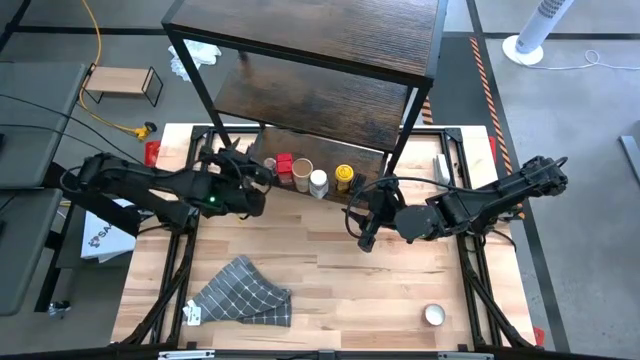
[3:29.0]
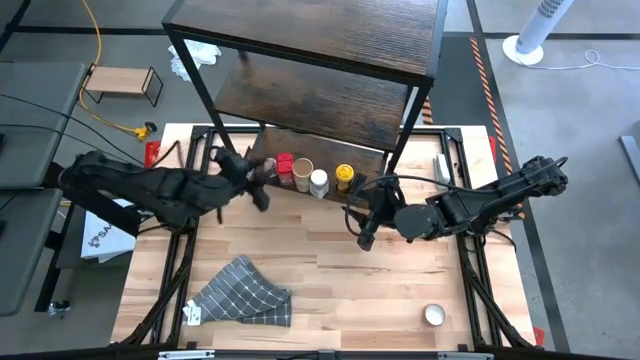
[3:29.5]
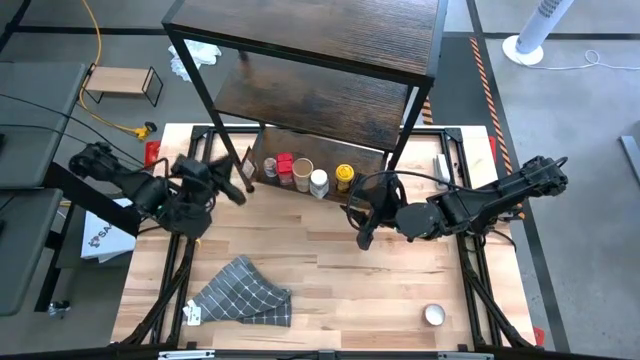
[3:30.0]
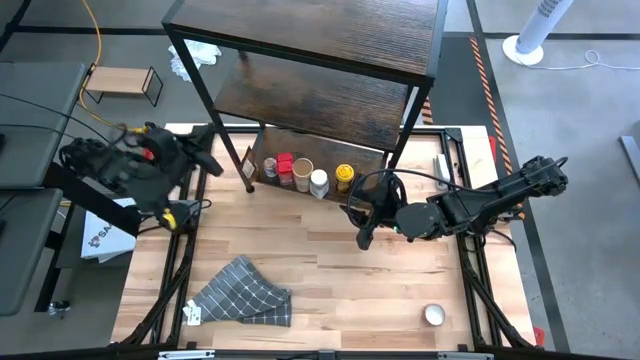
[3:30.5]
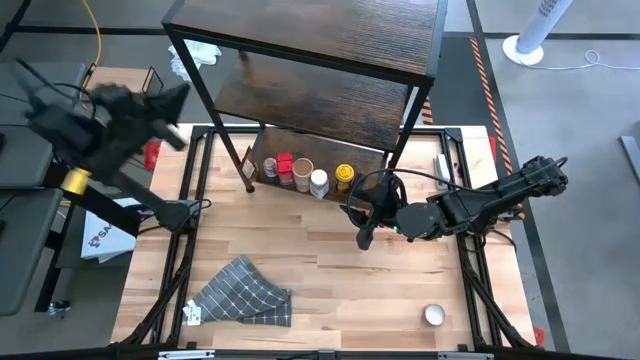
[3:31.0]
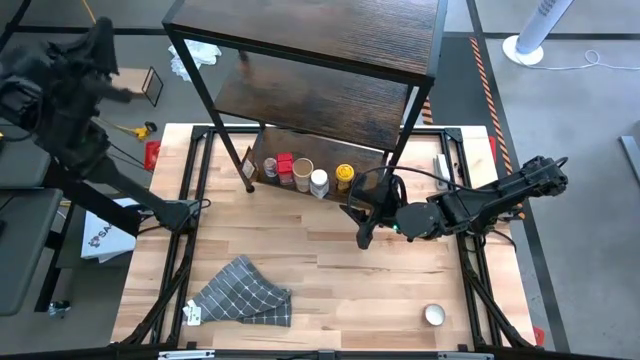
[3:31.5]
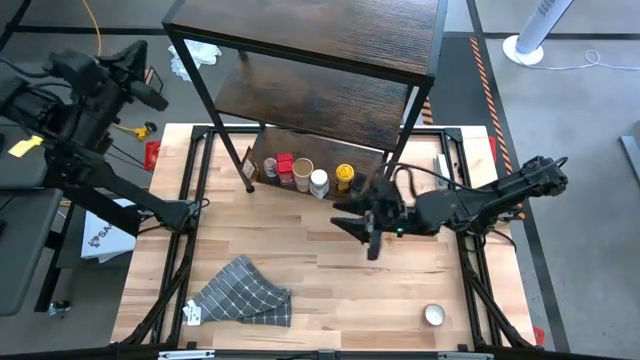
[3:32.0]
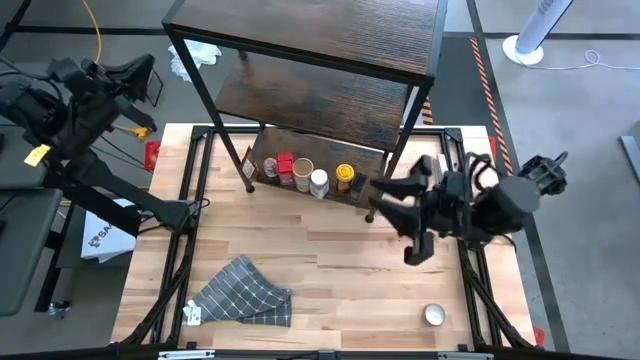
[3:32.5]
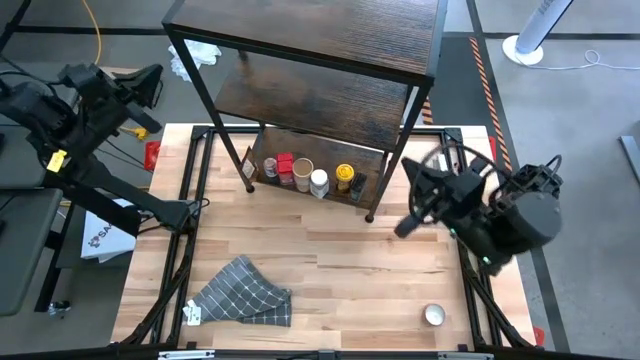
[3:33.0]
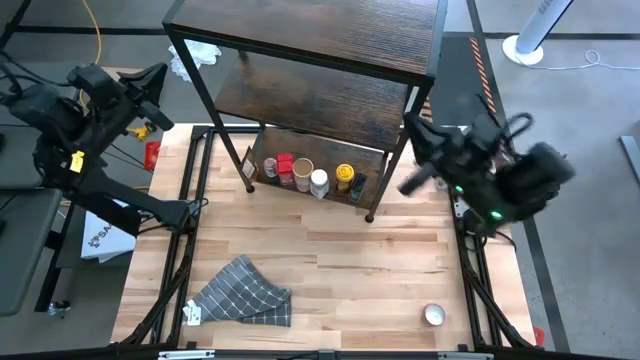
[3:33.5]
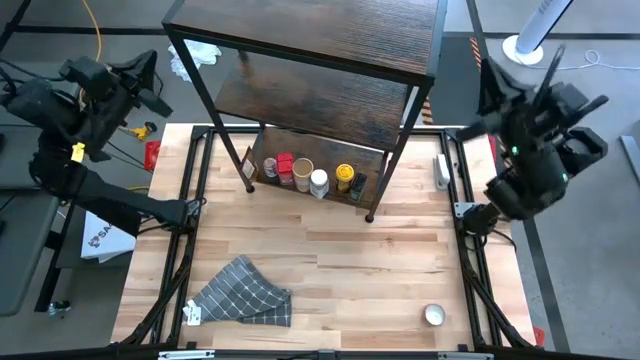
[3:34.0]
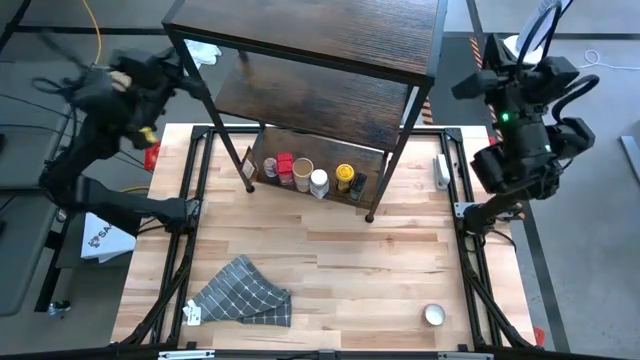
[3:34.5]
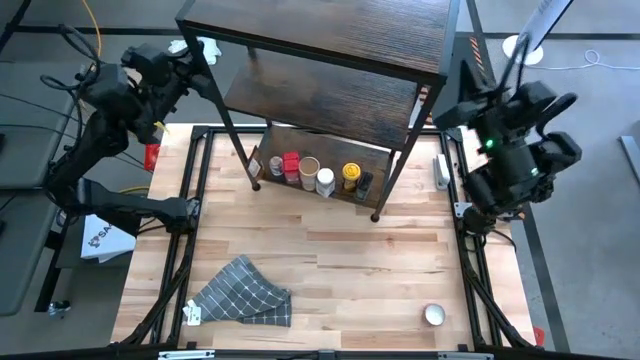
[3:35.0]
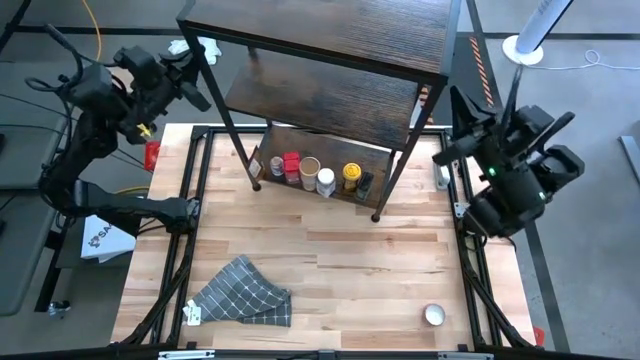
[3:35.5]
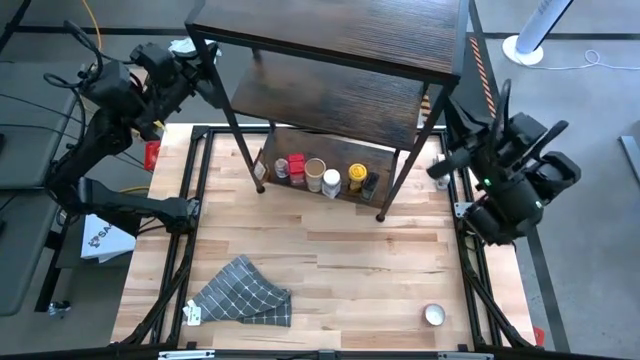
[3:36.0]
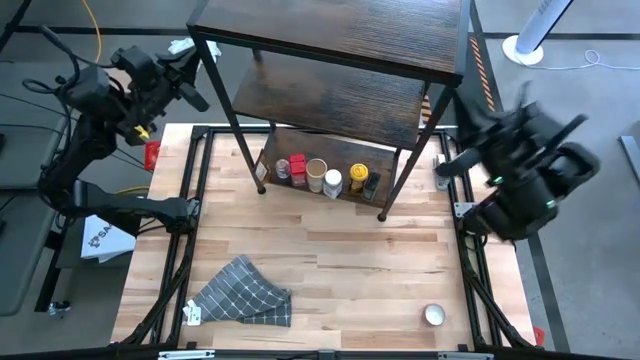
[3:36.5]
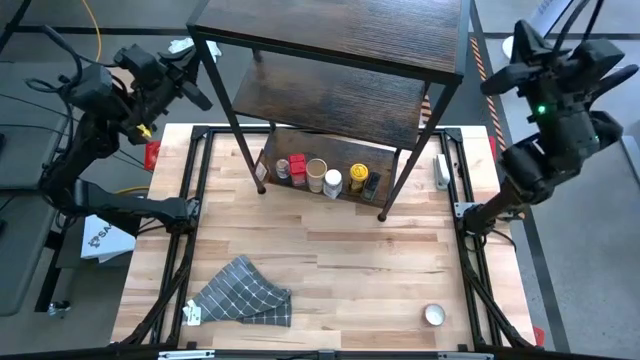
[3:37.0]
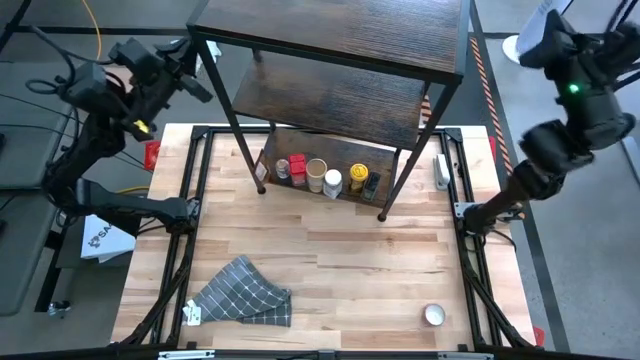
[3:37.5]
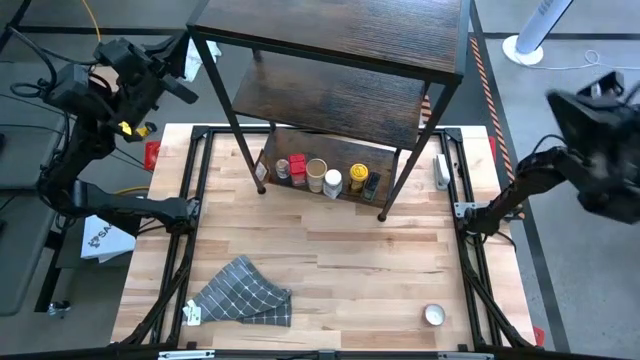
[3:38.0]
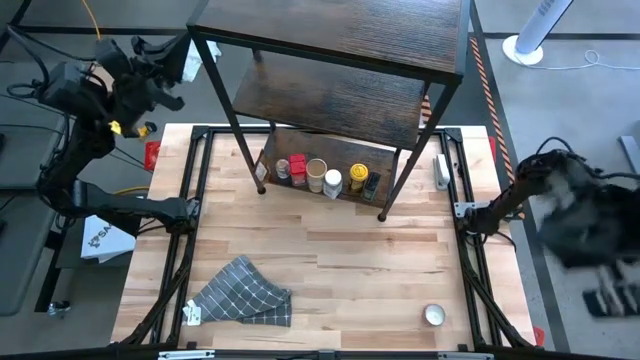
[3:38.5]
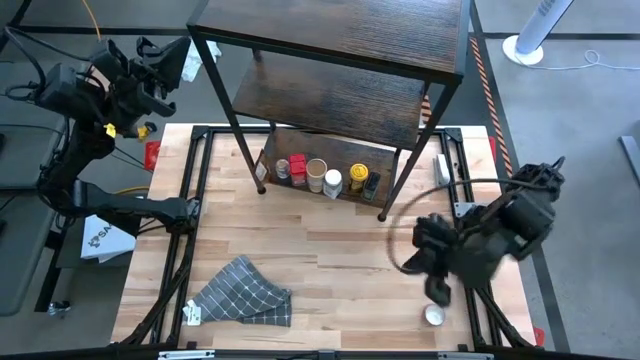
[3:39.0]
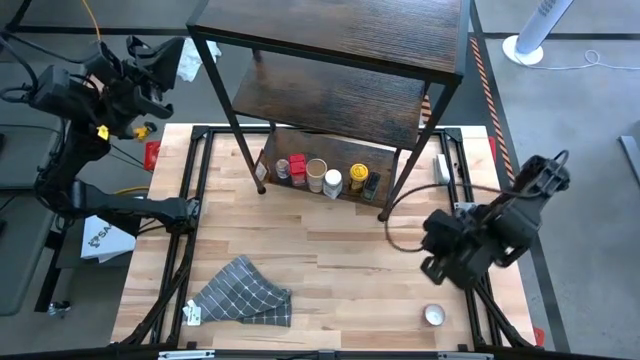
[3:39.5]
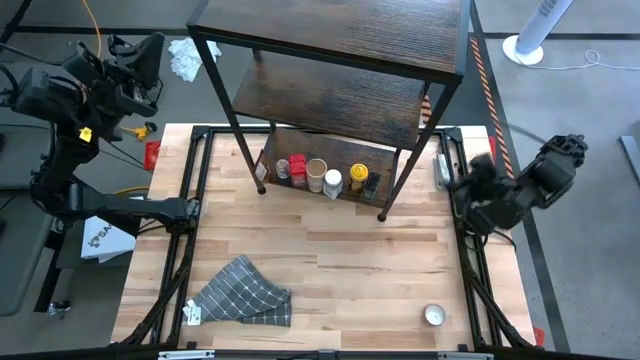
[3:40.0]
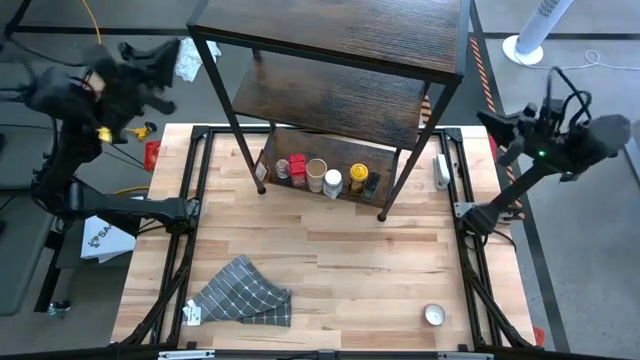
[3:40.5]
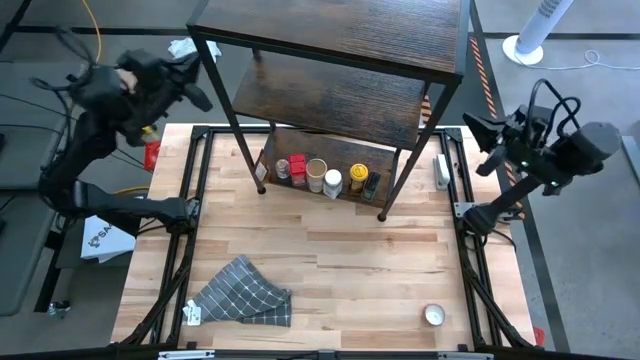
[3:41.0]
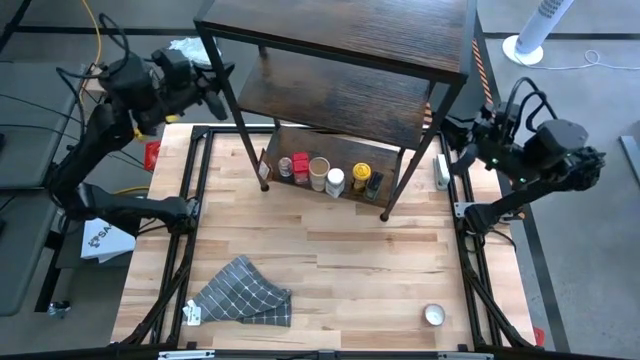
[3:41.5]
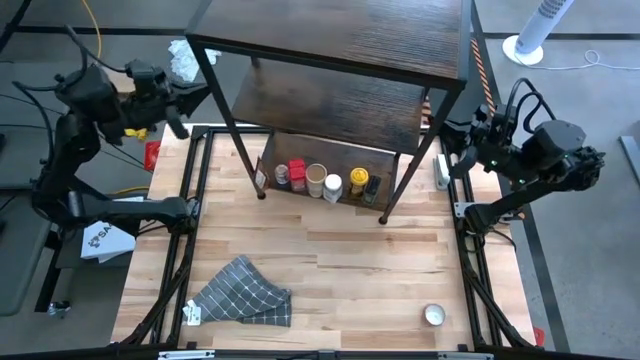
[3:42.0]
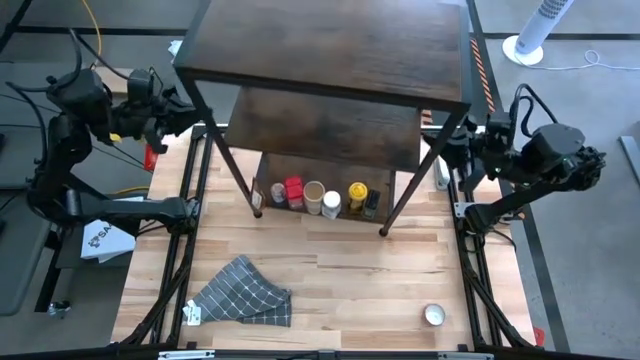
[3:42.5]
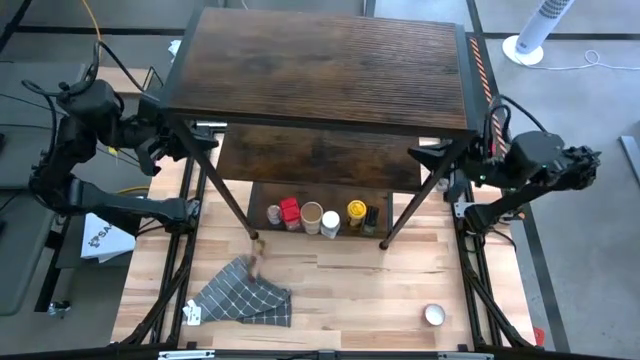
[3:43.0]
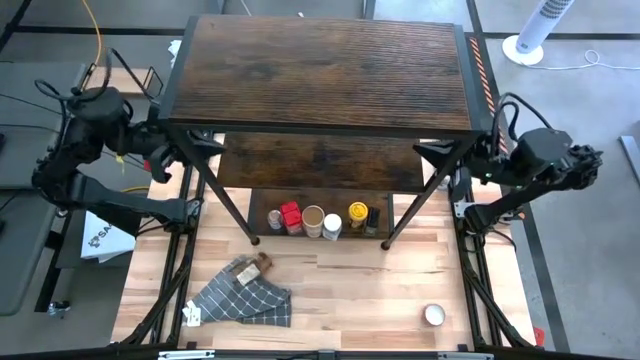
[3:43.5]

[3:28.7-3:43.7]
Task: Shelf spices
Adjust the shelf

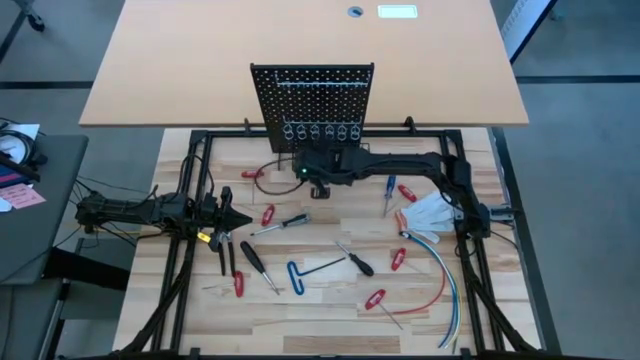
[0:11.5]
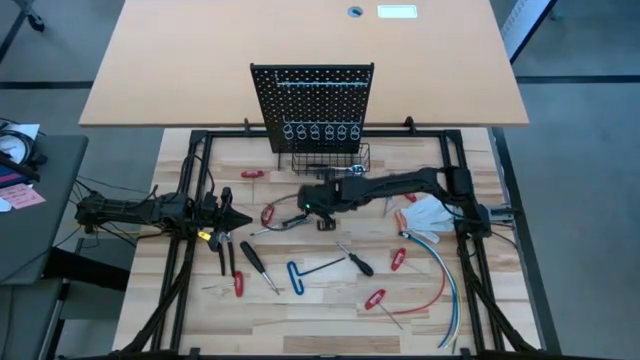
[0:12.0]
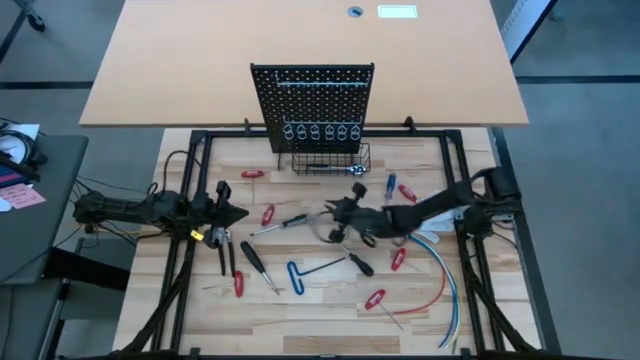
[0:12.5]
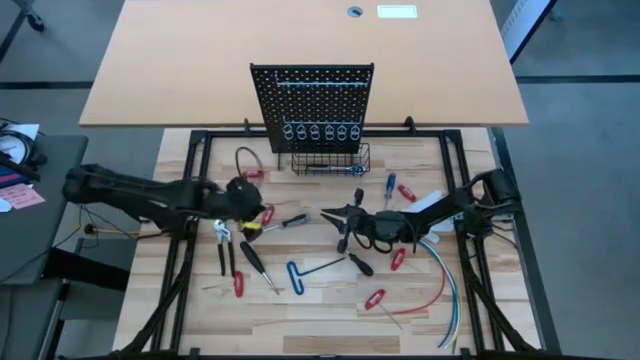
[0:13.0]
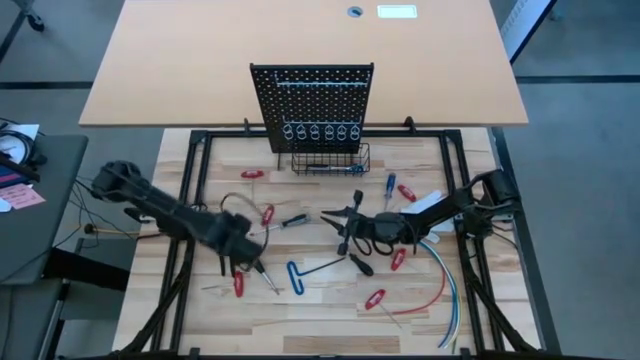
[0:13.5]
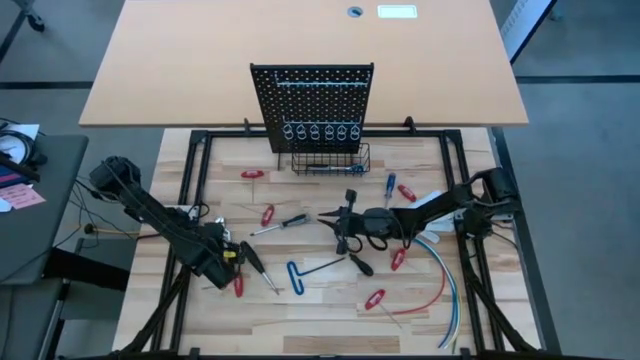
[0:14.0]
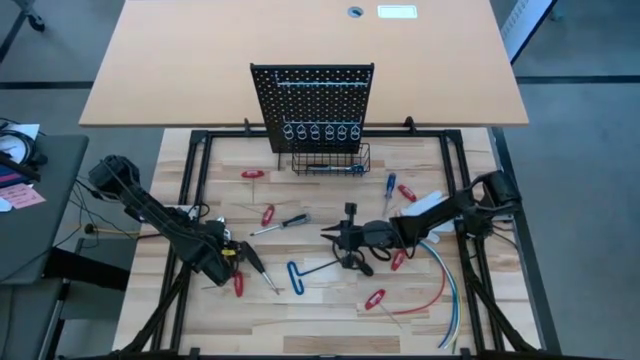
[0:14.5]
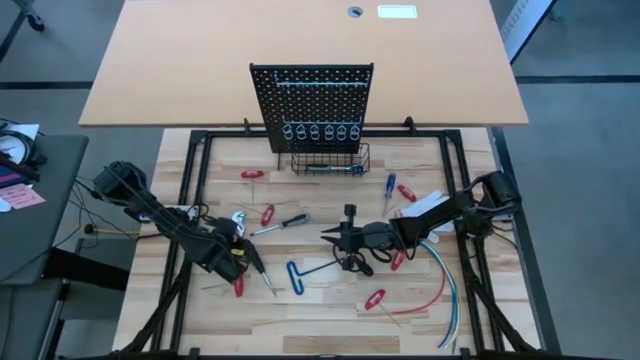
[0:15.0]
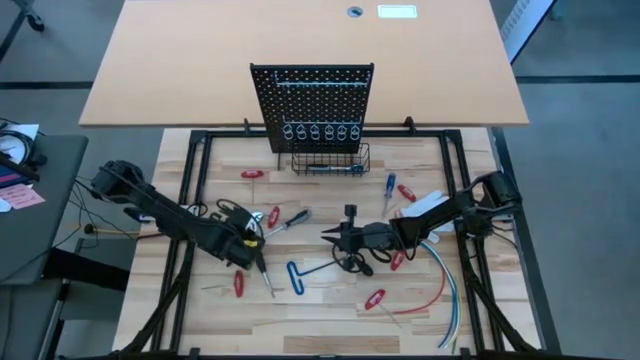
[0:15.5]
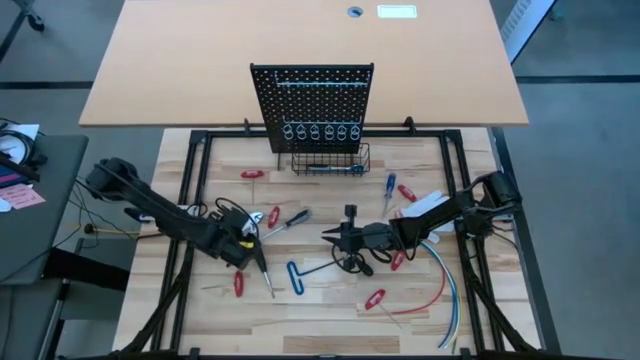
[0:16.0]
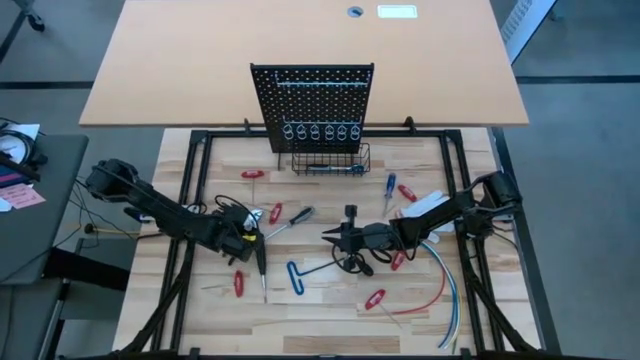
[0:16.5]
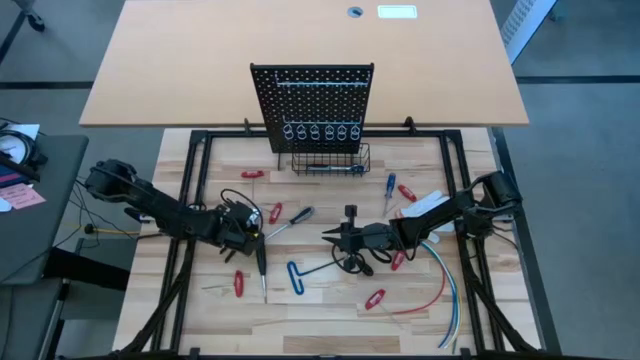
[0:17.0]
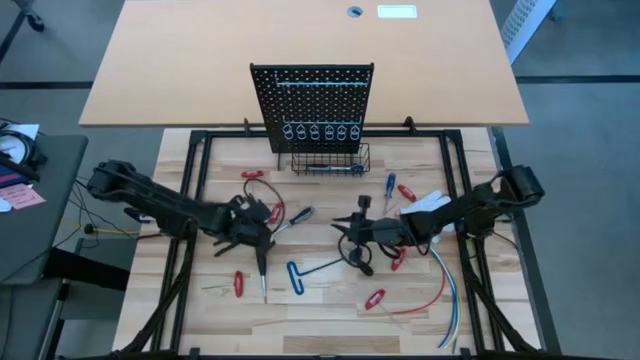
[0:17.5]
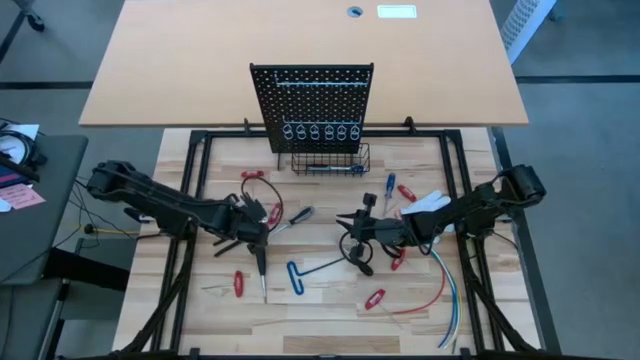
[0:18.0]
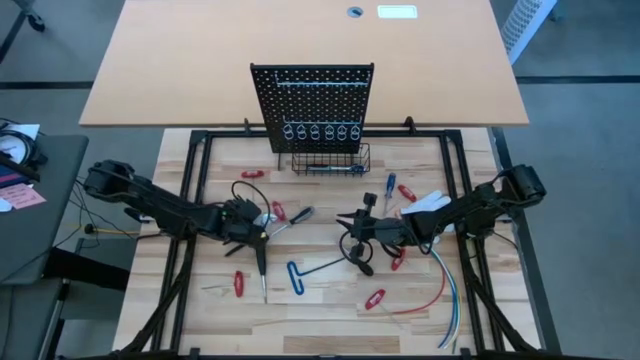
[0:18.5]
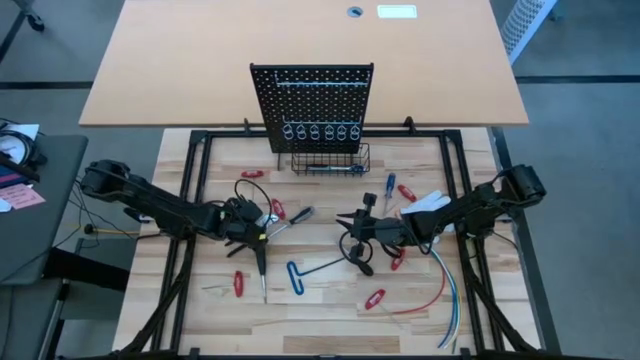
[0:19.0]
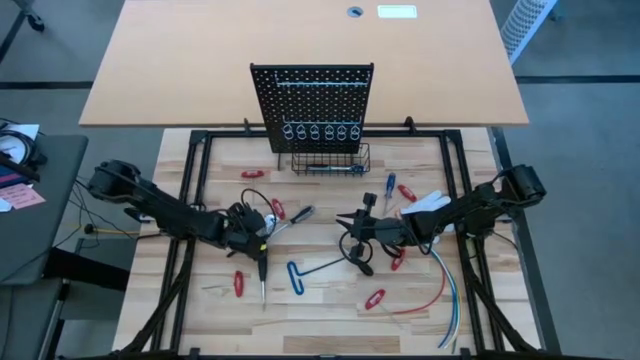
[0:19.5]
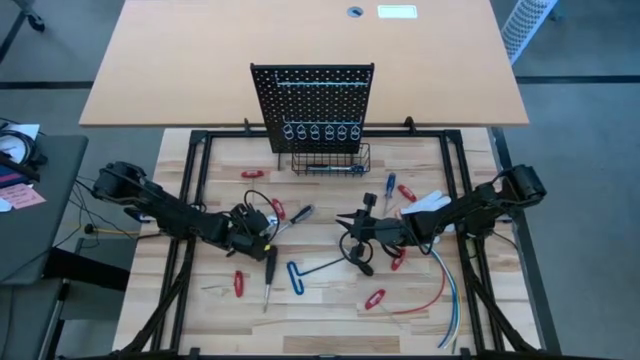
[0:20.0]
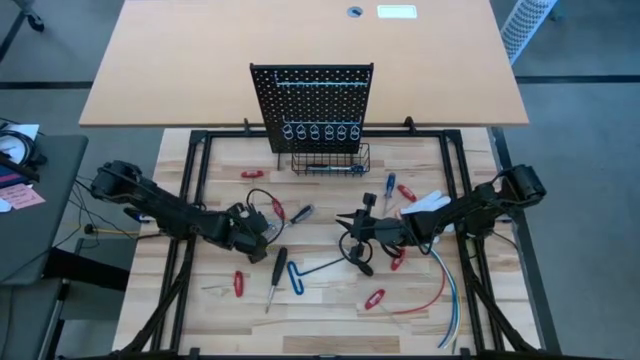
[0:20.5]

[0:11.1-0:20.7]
Task: Hang tools onto peg board
Put the slip-joint pliers into the wire basket on the pegboard
